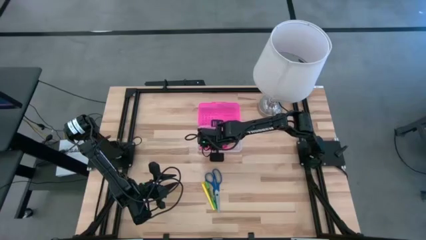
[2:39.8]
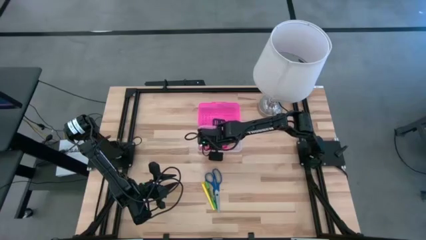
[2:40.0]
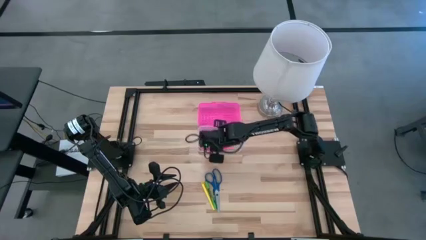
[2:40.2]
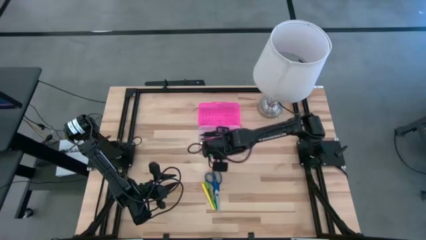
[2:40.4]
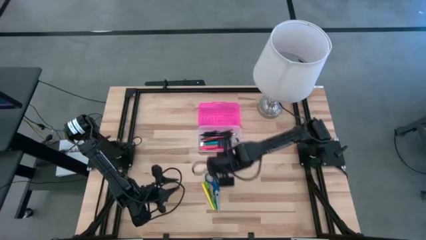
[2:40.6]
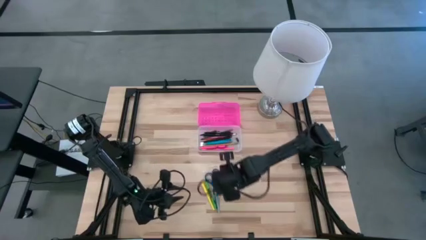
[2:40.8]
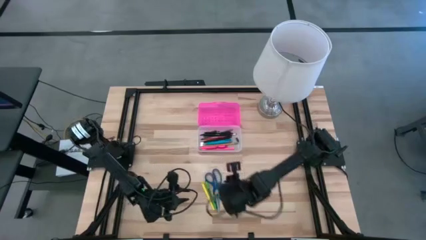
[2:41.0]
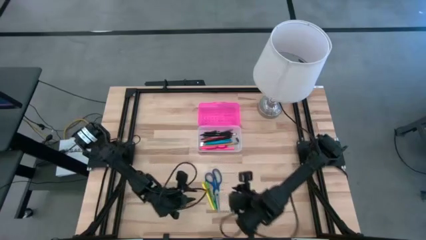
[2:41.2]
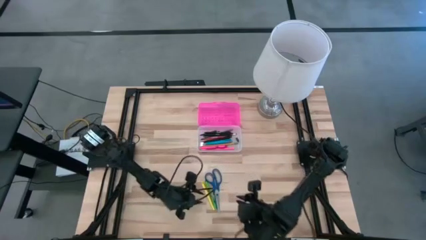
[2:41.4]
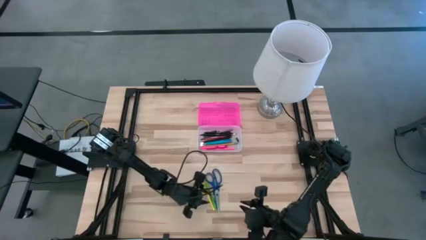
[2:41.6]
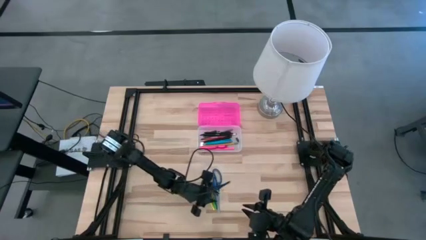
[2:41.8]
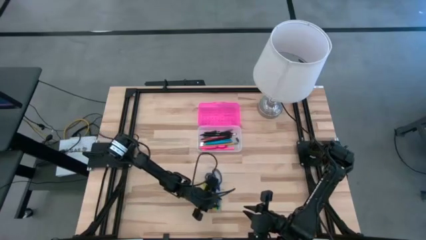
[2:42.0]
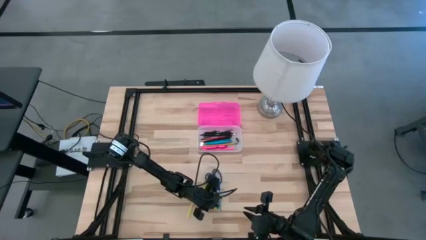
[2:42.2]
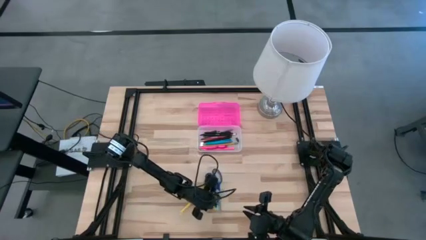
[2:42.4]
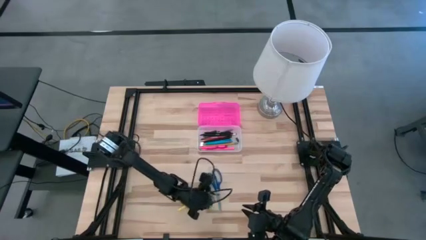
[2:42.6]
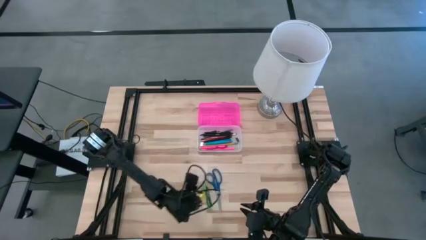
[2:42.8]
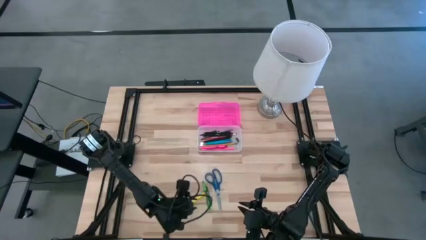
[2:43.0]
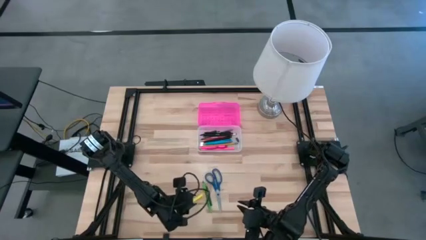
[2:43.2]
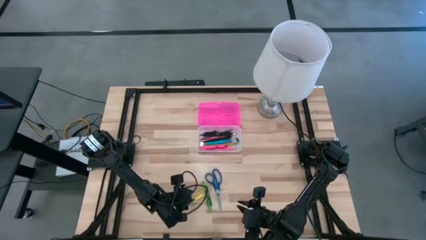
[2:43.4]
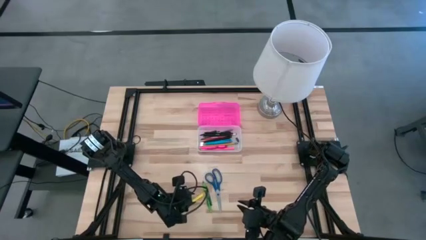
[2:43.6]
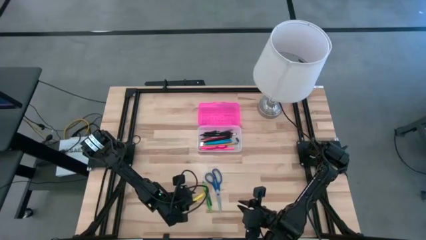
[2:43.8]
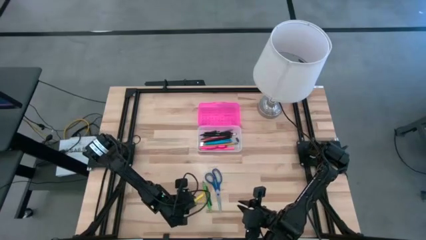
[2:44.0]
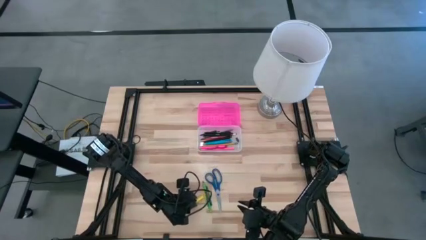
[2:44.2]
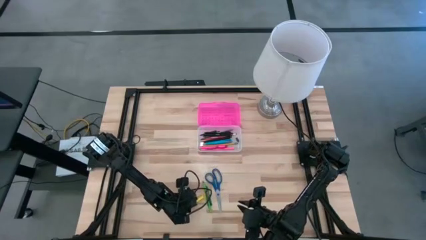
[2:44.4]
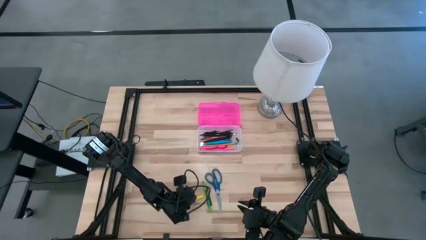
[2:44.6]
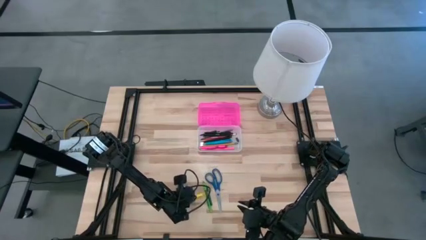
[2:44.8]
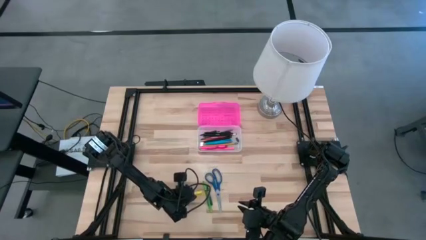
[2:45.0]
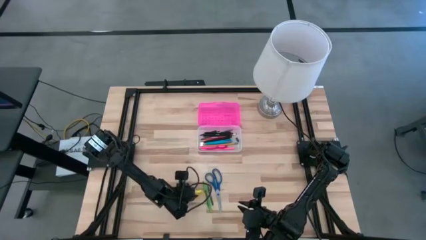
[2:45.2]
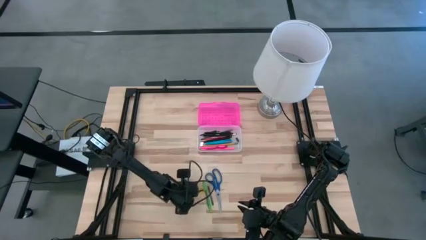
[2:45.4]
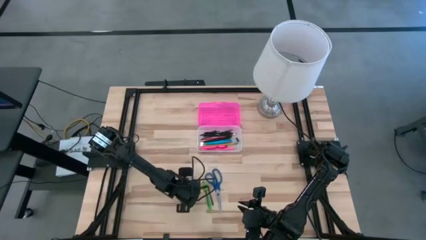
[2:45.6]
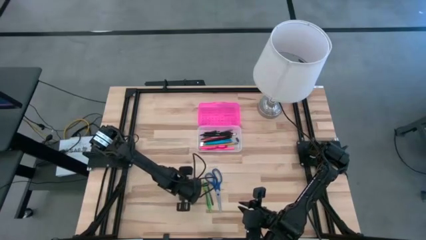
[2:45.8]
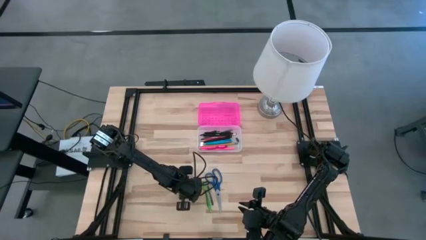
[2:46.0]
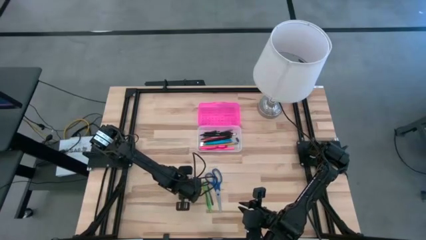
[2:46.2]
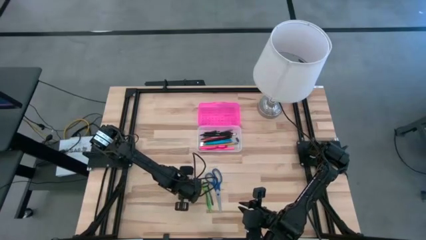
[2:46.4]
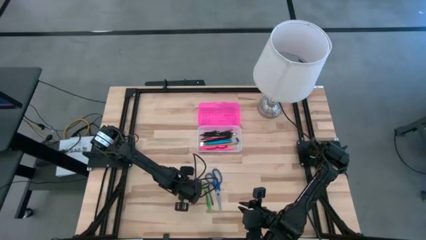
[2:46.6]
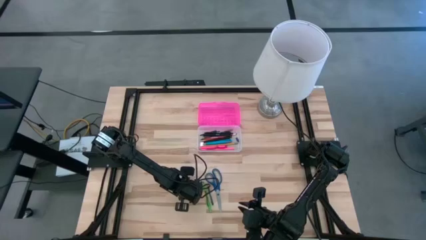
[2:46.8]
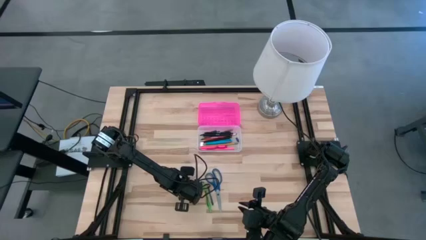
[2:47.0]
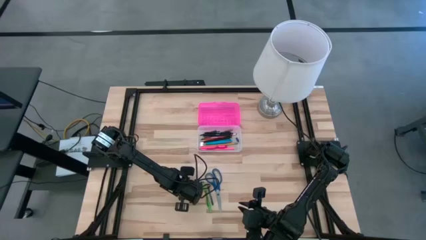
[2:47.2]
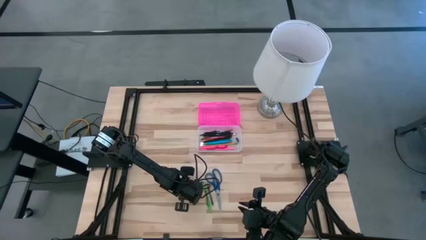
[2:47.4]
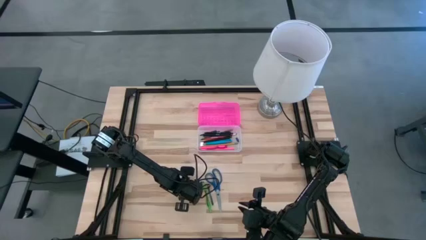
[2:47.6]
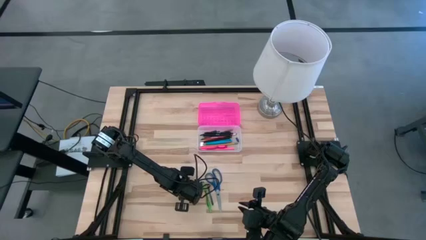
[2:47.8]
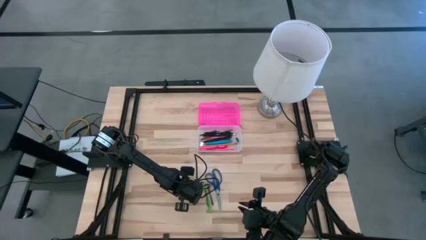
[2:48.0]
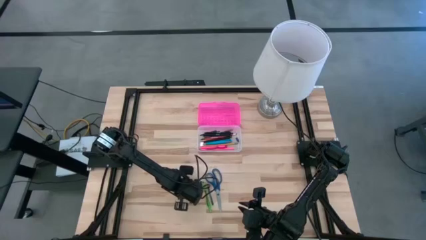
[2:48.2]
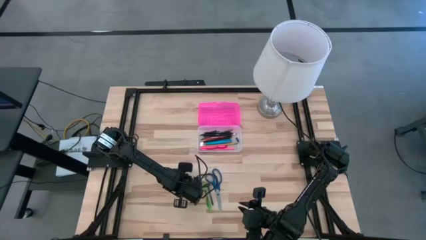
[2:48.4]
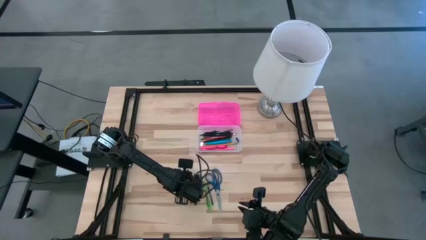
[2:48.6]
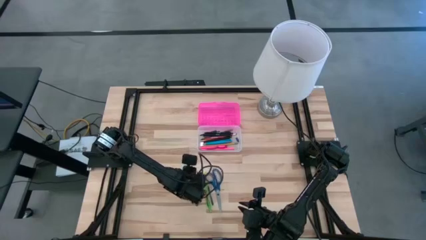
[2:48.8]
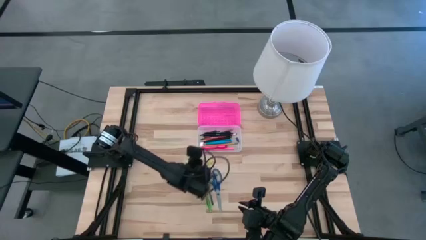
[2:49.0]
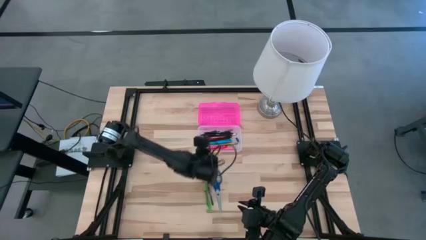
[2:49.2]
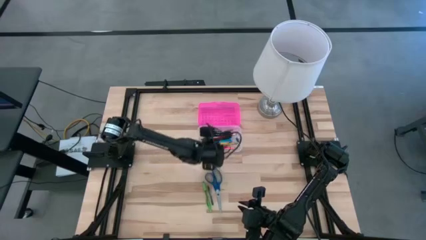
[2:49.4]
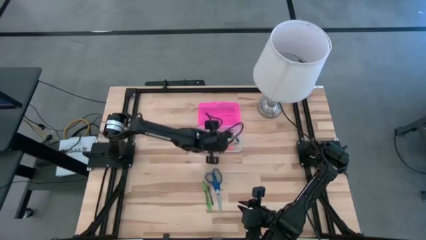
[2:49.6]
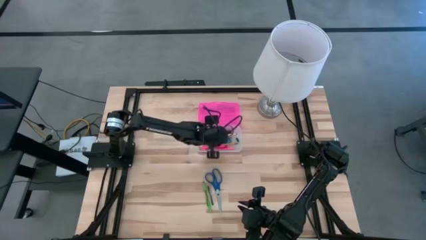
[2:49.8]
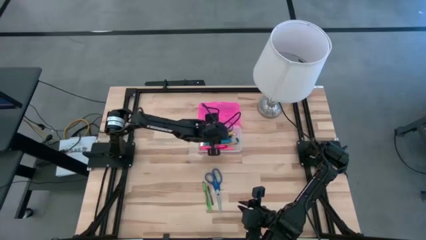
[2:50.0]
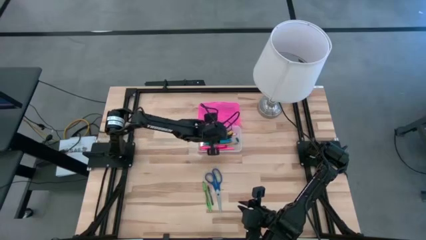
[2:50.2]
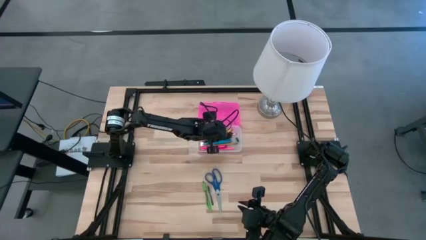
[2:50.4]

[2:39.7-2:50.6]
Task: Pick & place school supplies into a supply box
Put the yellow highlighter pen into the supply box

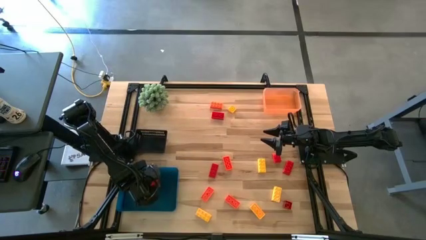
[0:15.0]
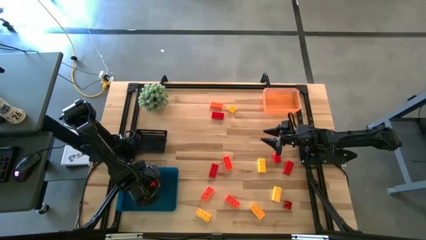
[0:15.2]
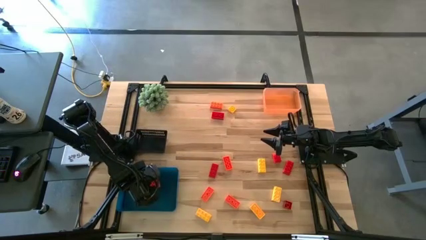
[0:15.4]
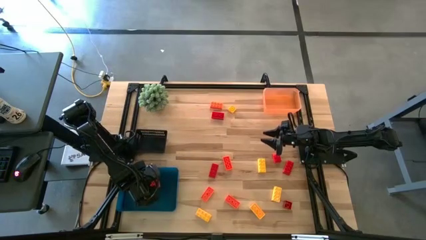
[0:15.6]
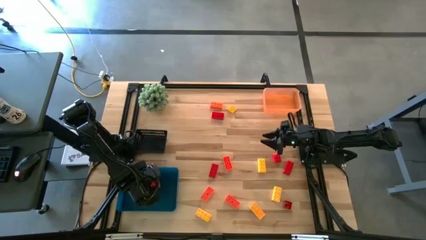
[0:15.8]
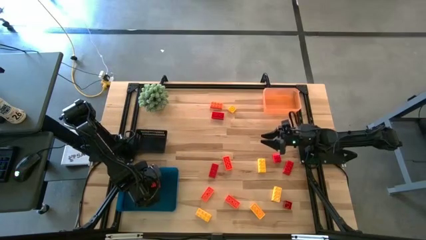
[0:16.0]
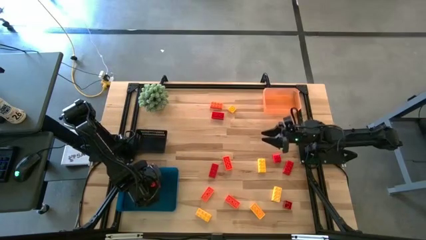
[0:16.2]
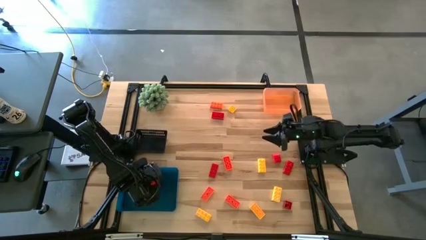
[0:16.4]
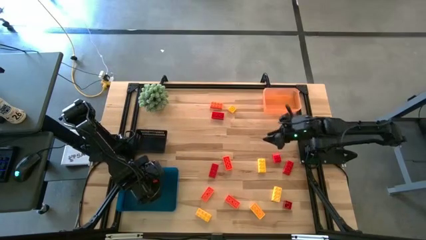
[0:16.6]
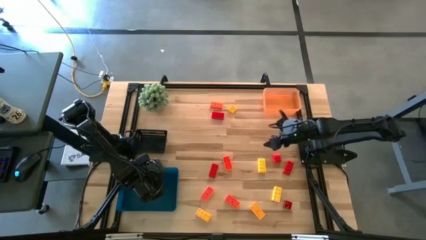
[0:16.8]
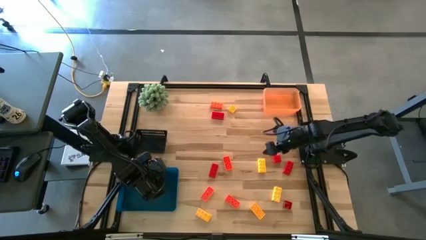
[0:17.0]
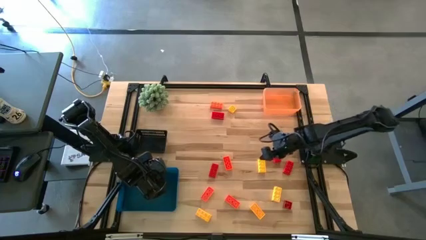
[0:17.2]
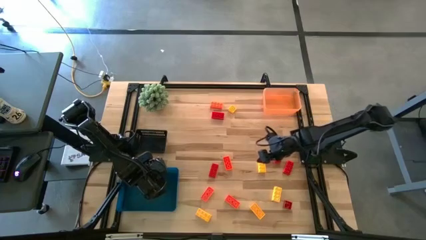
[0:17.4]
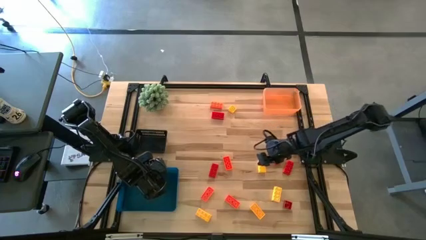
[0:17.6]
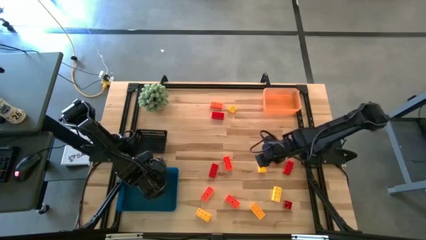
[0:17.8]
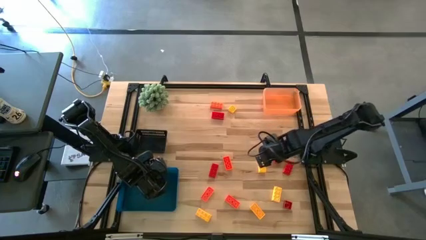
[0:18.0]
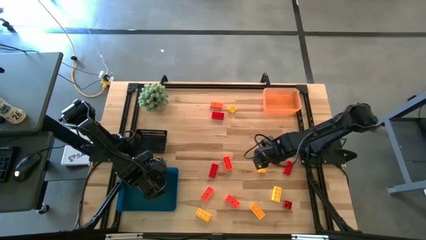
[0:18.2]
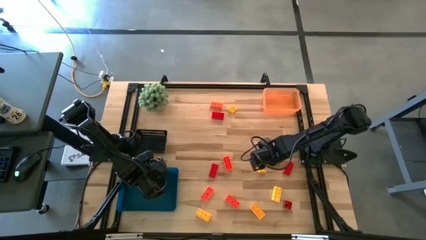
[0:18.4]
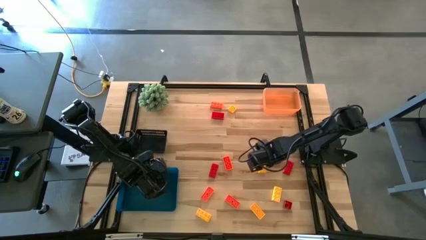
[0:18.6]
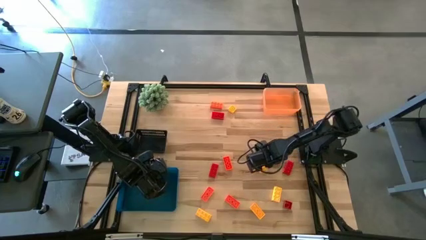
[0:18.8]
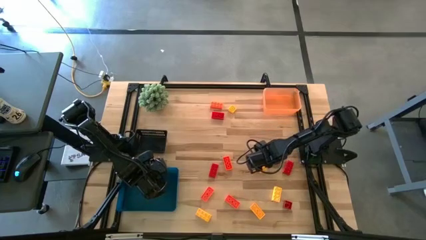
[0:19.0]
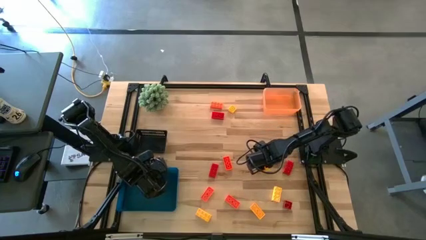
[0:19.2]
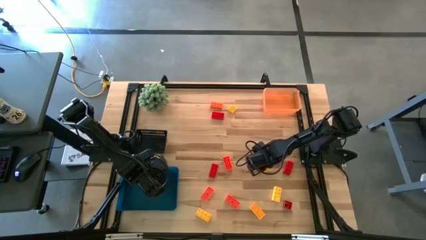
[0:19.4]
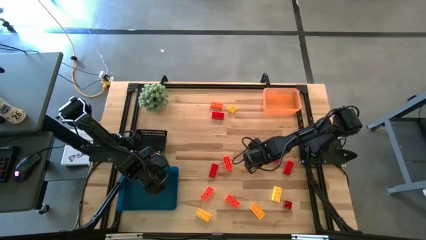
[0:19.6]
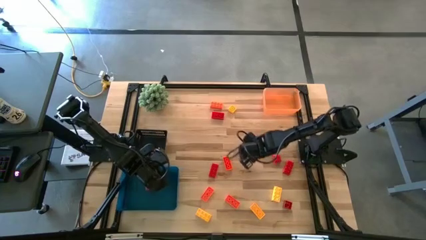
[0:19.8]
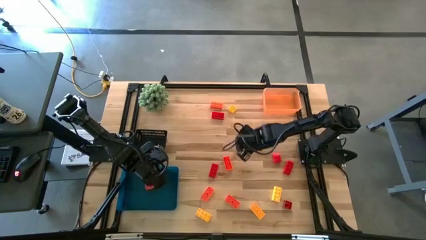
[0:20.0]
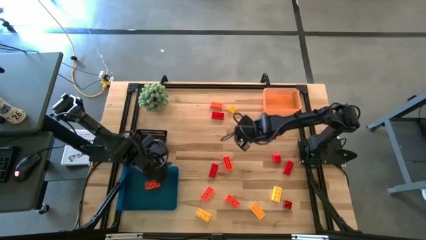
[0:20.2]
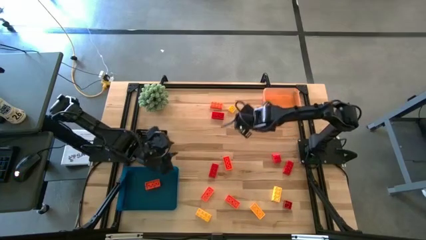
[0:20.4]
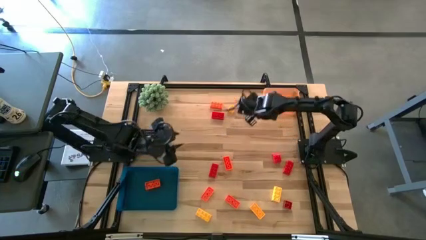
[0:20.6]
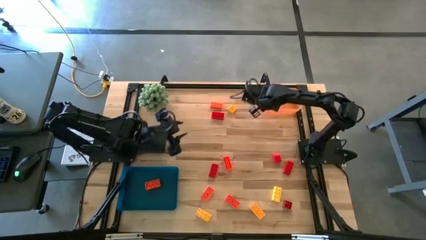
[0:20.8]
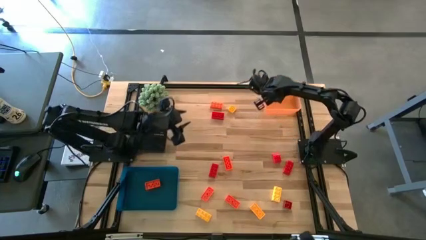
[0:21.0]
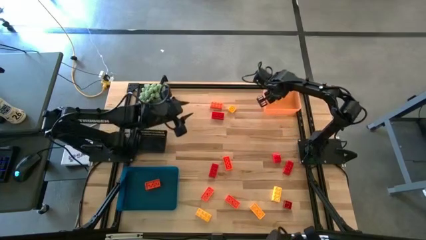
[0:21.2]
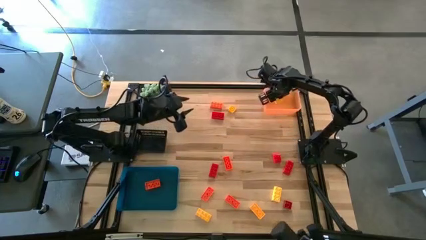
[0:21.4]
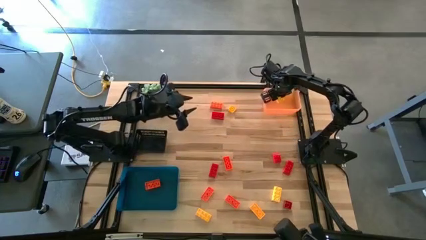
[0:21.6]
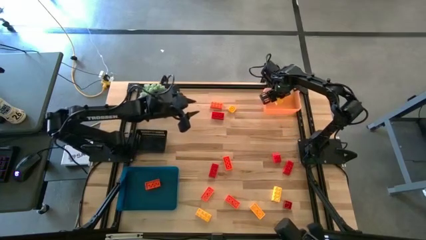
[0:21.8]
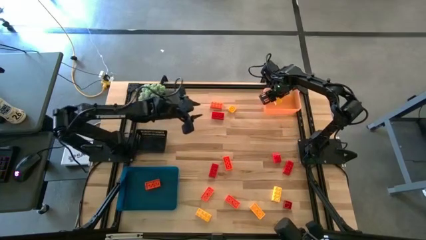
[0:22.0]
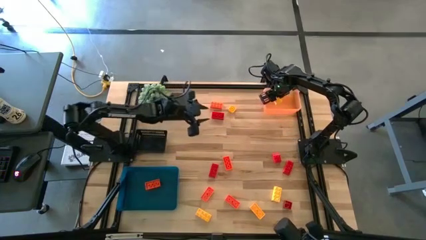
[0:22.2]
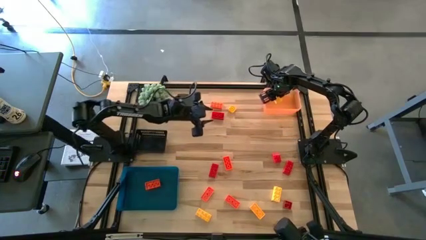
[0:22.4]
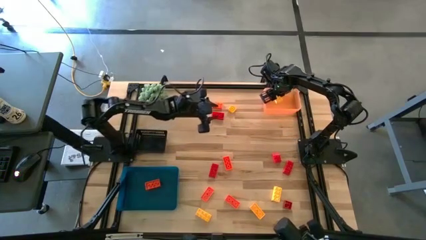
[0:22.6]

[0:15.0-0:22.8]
Task: Sort & place blocks by color
Put the yellow game piece into the orange bin
